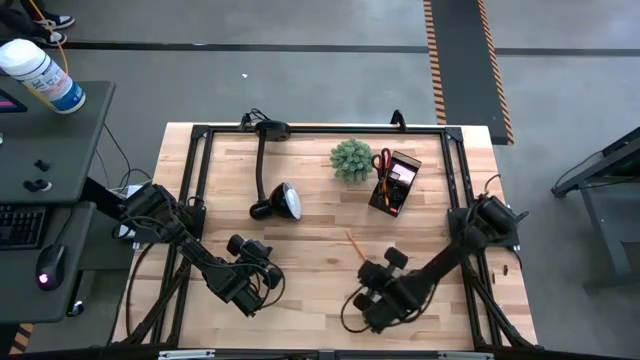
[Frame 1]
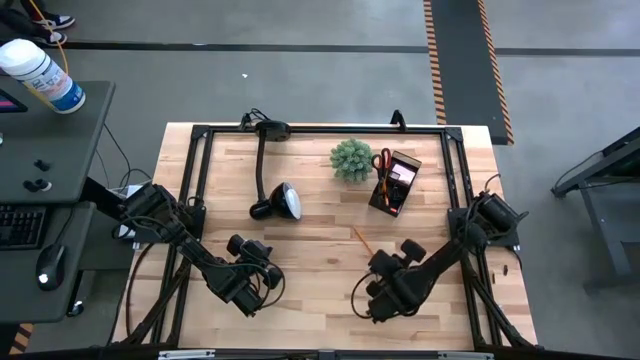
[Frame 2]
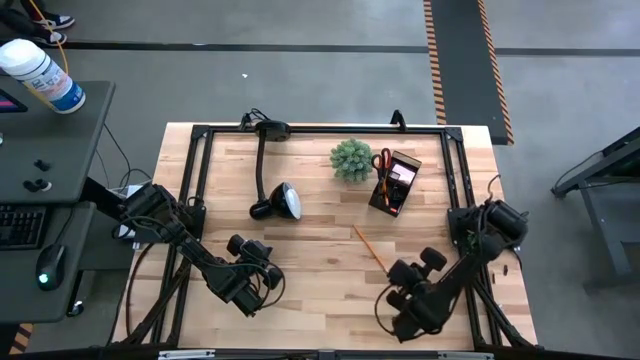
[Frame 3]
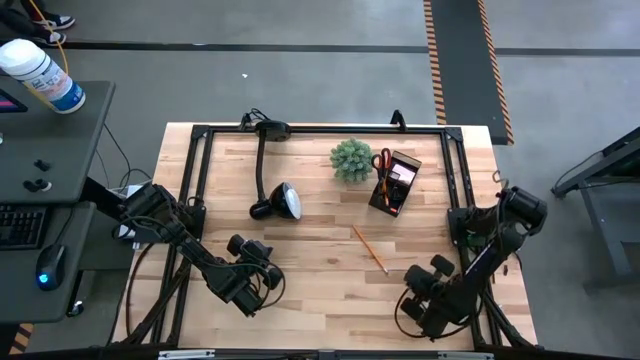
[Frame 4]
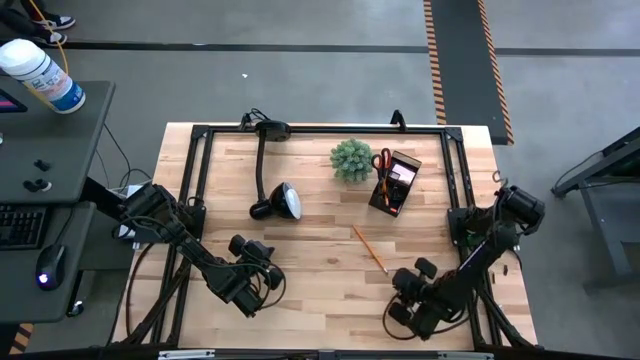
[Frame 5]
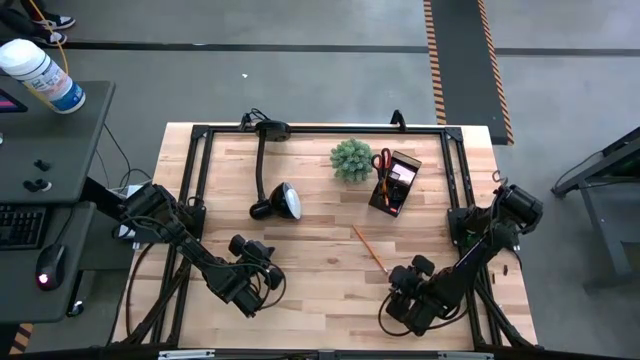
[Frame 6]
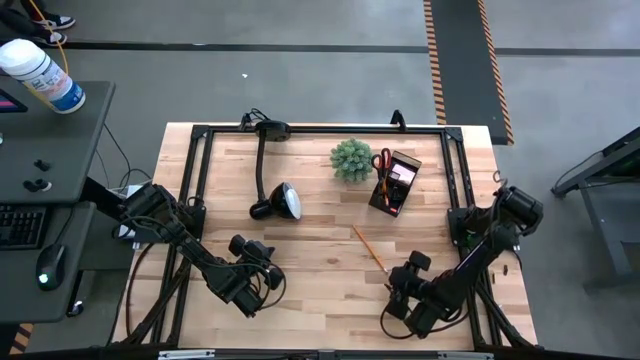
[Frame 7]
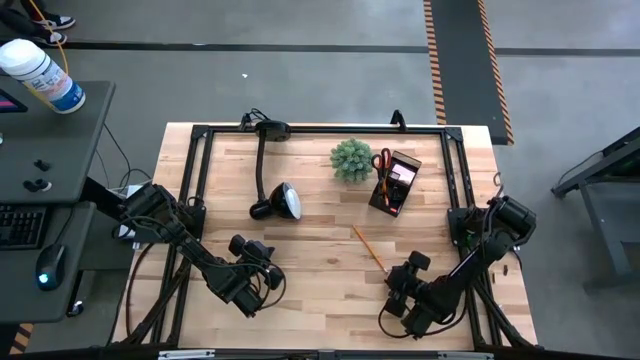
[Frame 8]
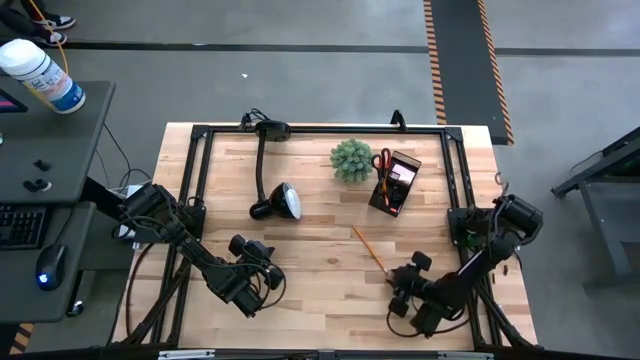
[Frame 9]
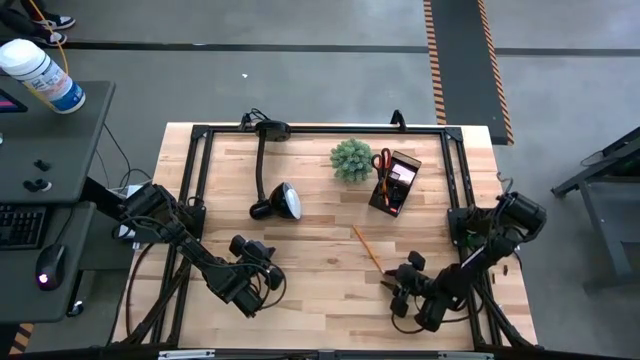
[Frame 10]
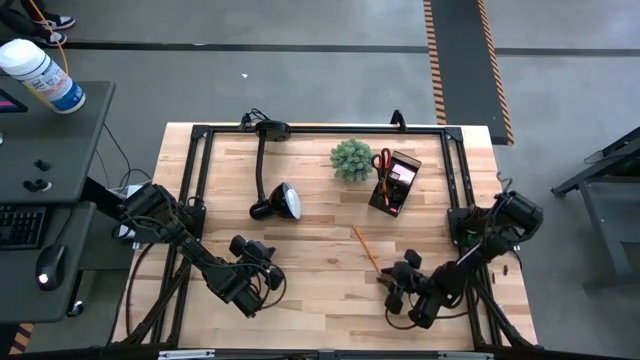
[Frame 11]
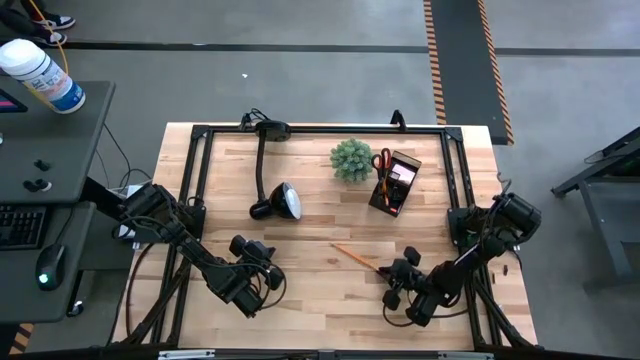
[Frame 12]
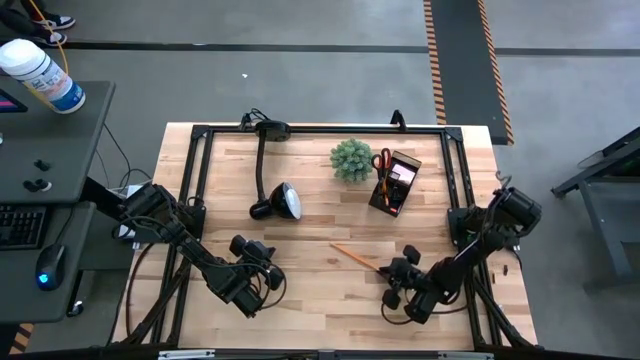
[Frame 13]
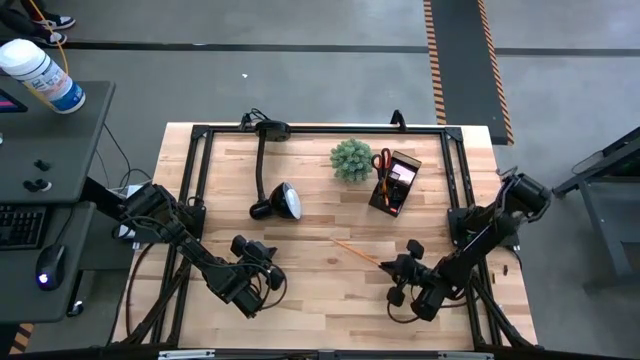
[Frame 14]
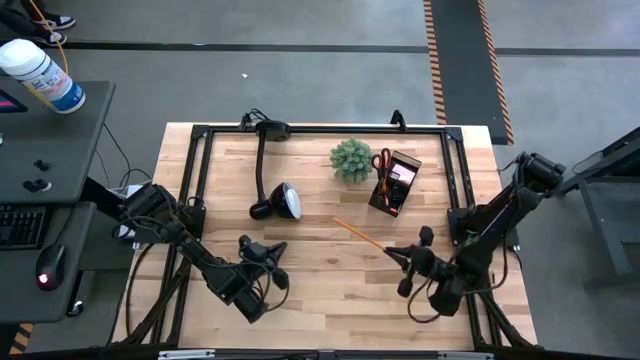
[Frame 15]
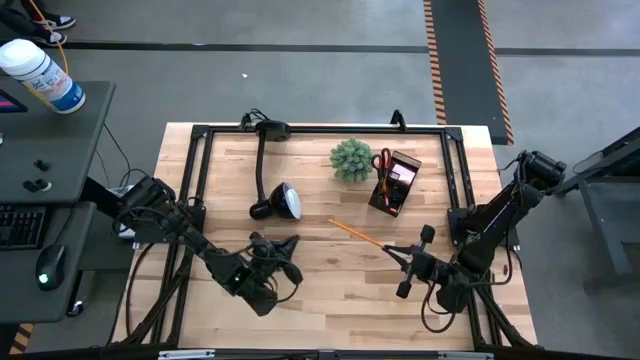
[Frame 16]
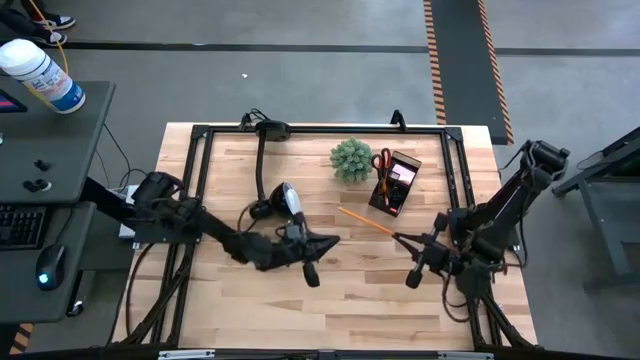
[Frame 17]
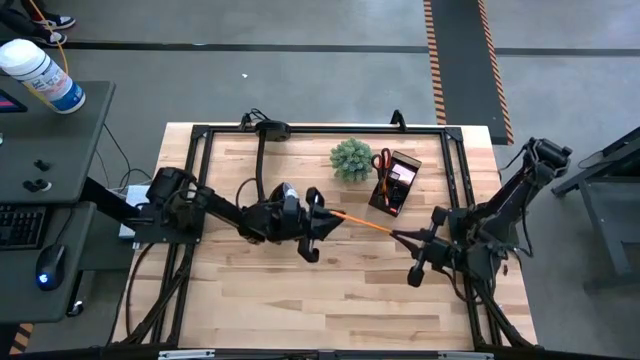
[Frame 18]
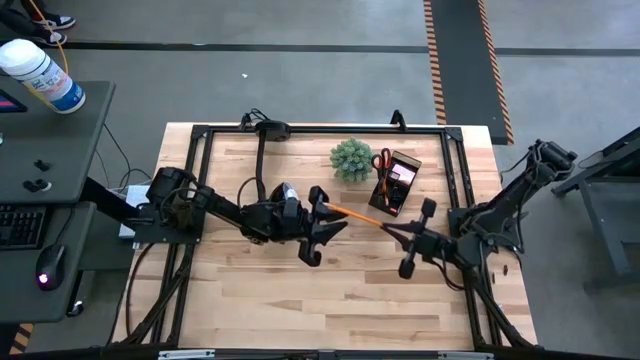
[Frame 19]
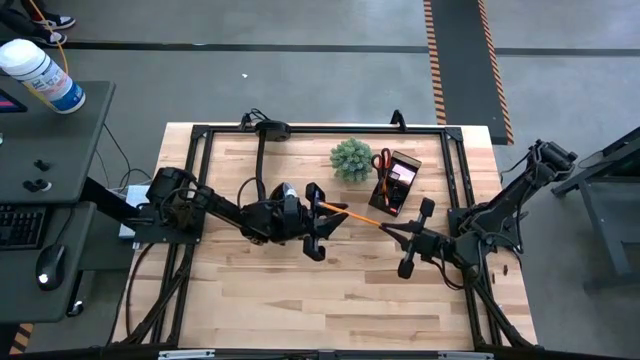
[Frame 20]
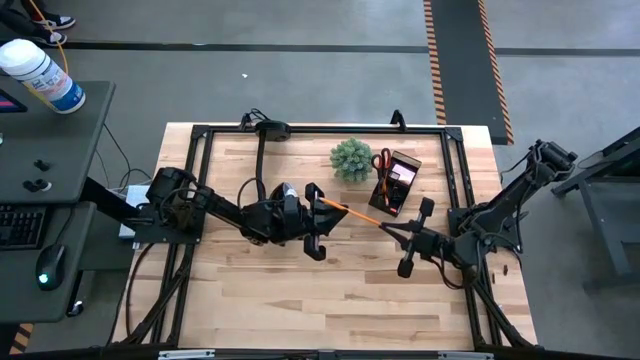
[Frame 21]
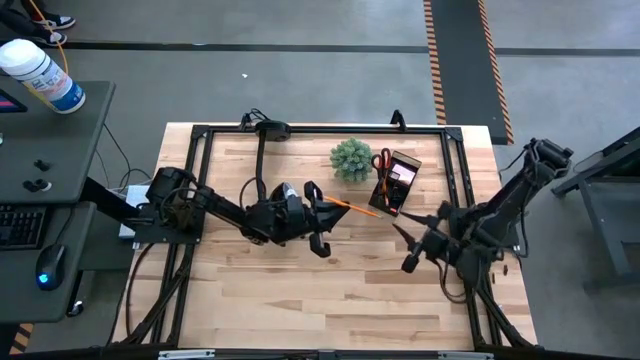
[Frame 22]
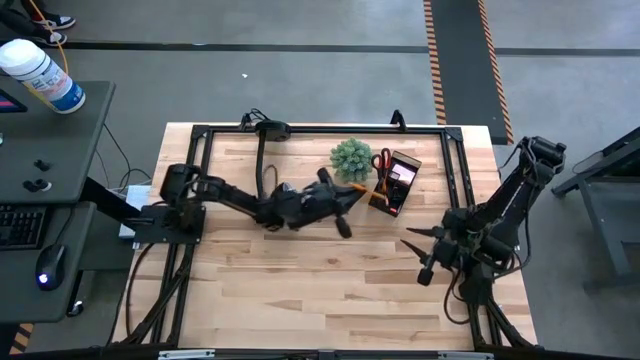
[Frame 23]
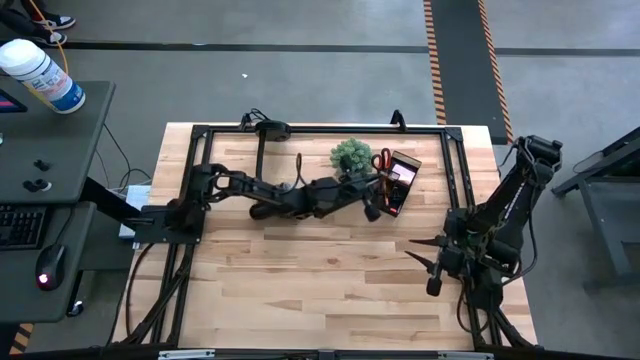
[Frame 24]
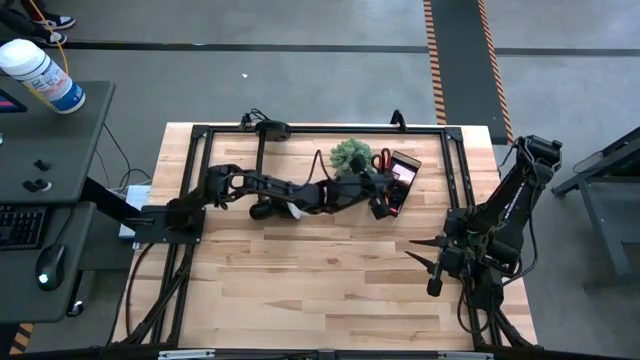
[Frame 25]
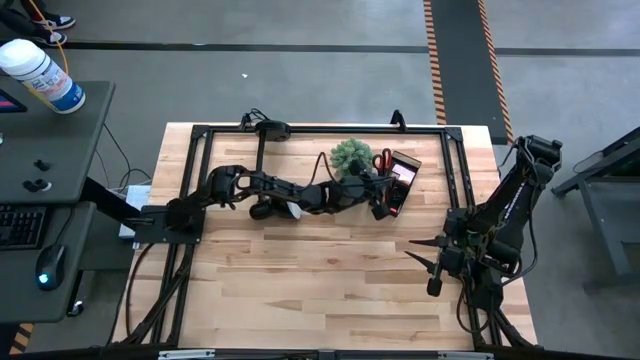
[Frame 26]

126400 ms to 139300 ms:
Task: Pick and place office supplies into organizer
Put the orange pencil into the desk organizer

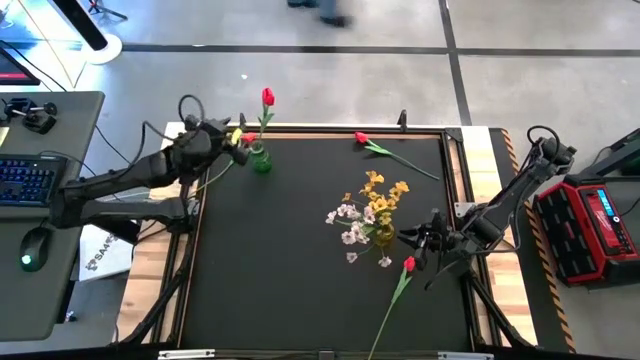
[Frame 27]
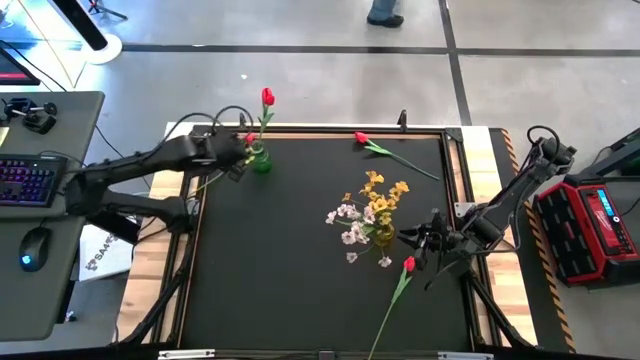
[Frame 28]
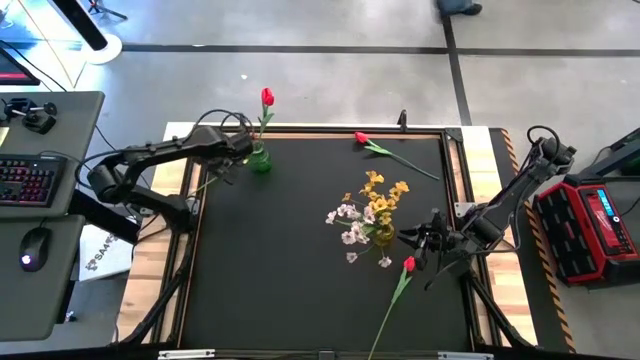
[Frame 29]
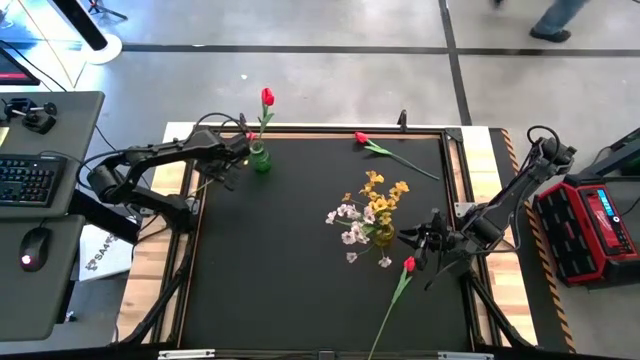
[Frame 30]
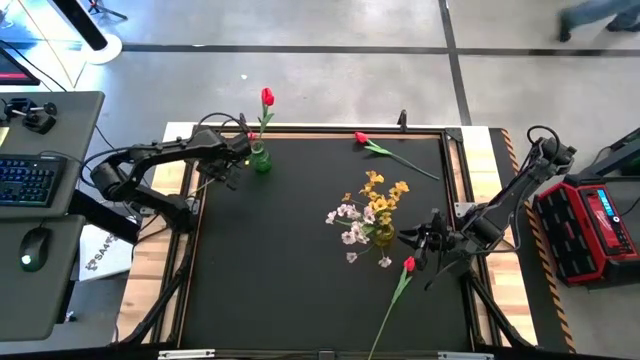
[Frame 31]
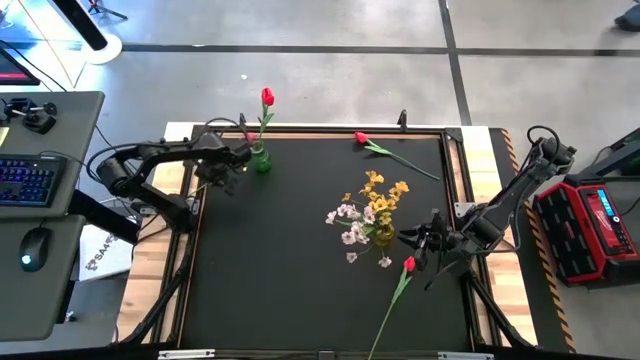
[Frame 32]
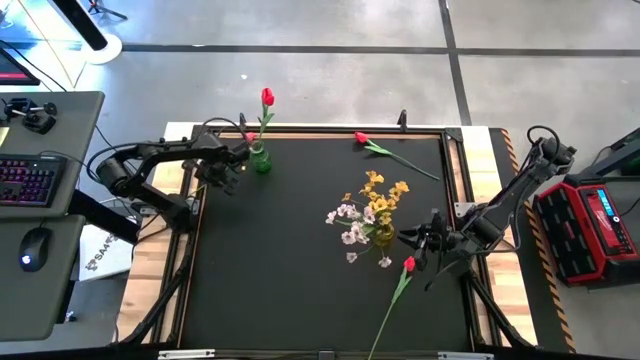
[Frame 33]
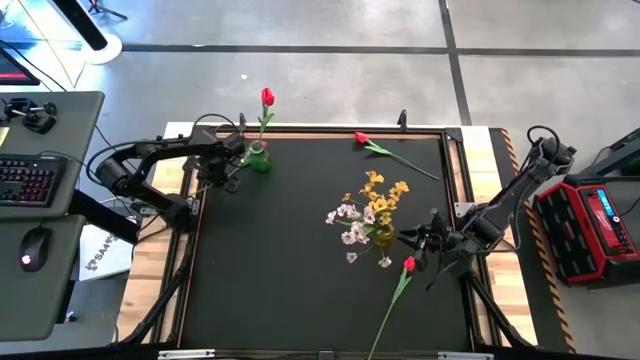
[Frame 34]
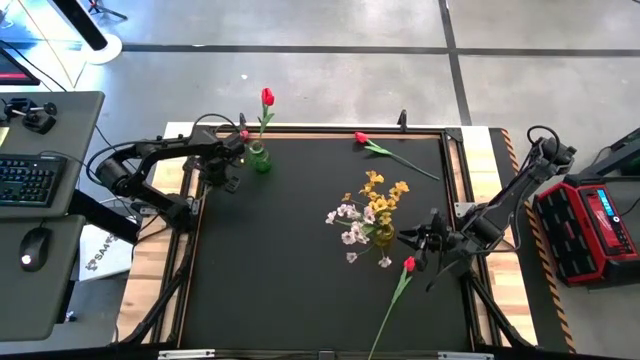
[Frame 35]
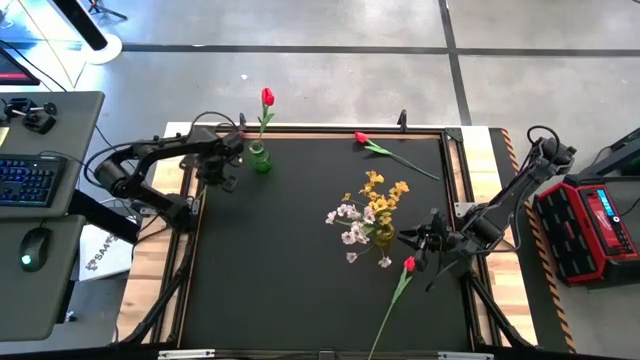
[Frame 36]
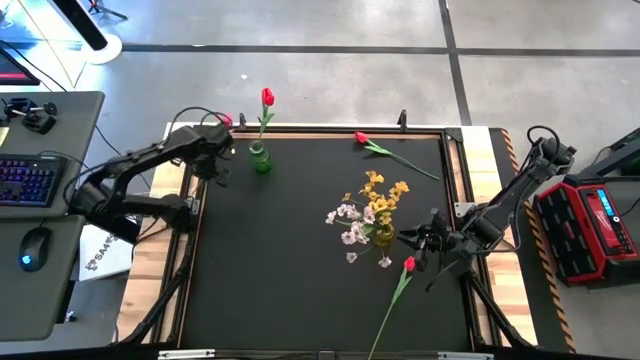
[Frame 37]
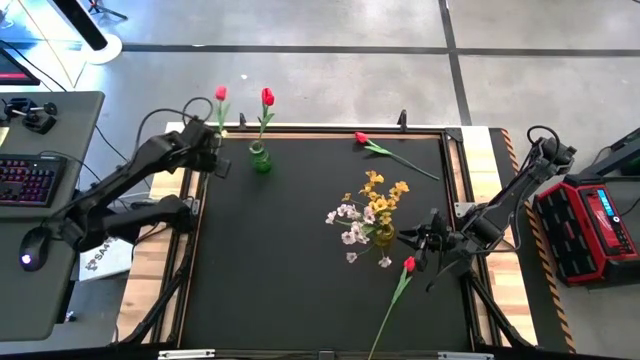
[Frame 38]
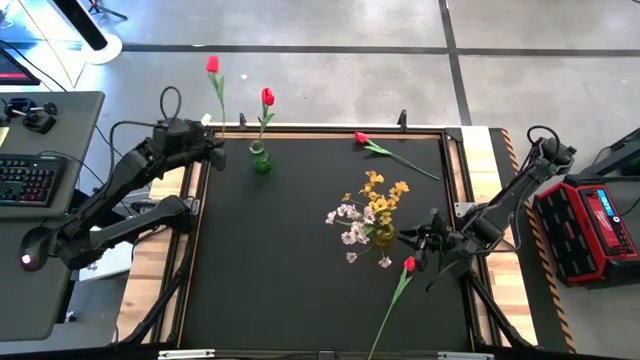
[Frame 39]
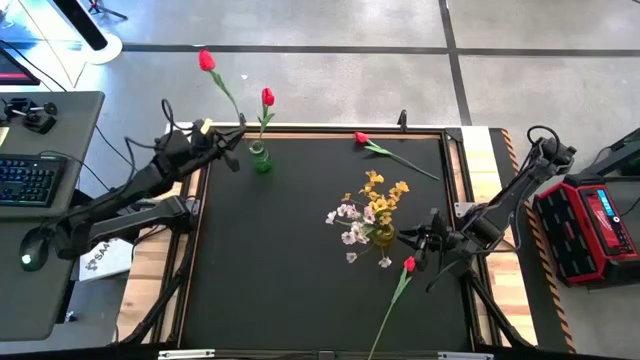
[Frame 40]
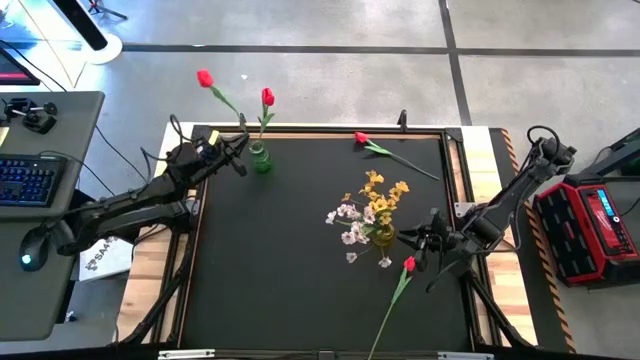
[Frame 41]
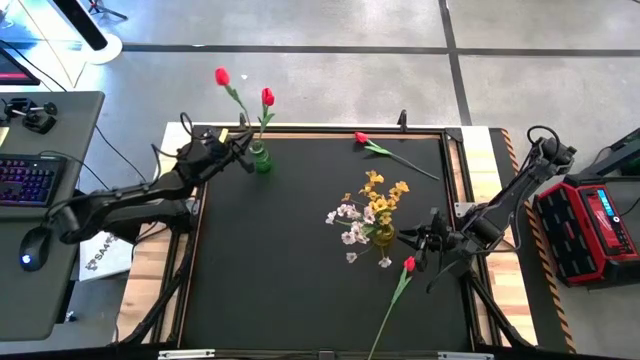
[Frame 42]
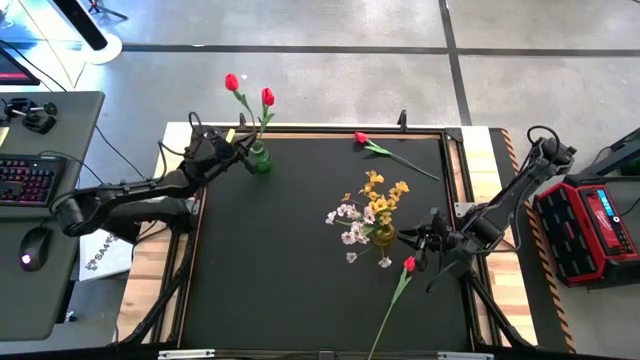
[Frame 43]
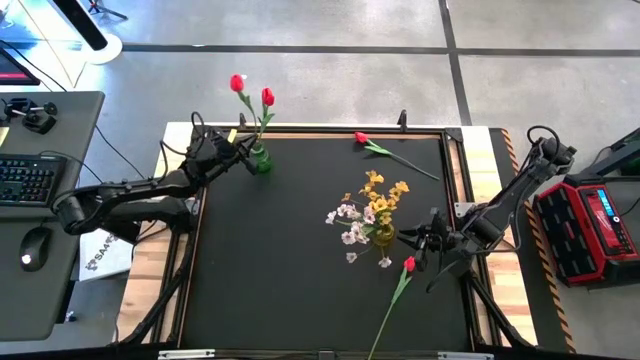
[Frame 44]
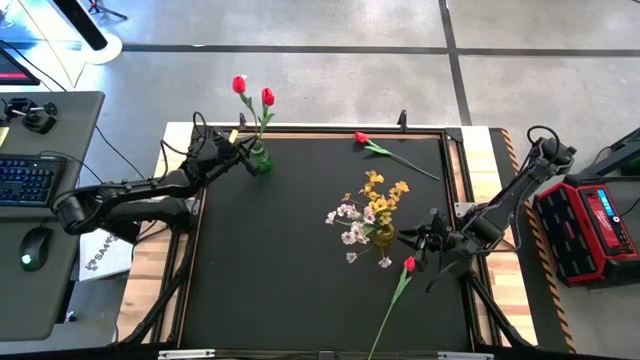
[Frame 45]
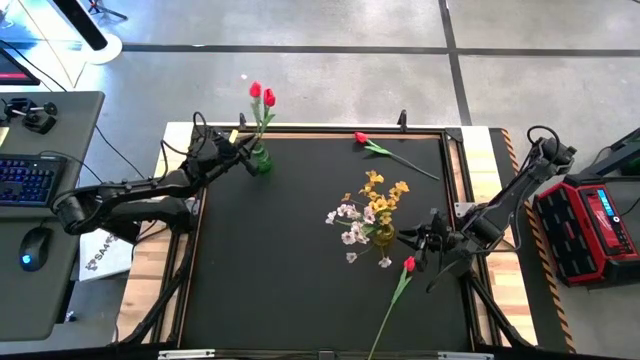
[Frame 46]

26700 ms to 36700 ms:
Task: Sort flowers into vase by color
Put the top left red tulip into the green vase
